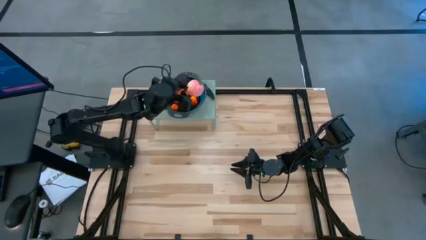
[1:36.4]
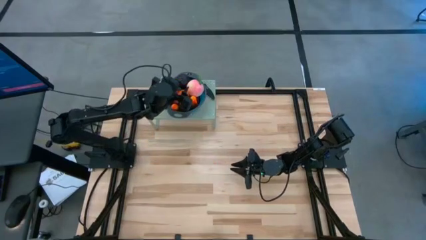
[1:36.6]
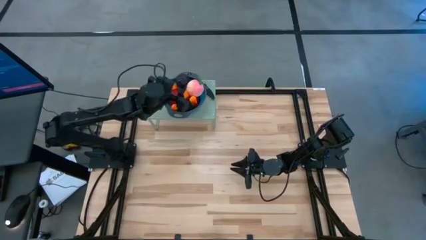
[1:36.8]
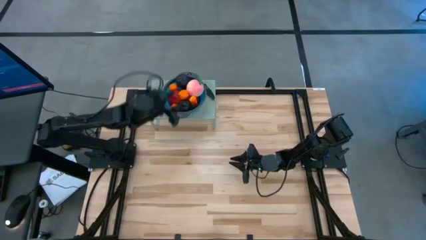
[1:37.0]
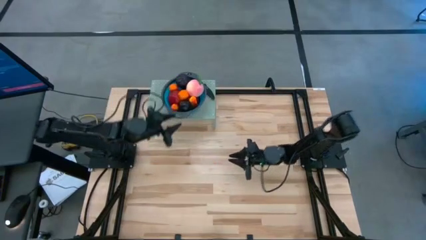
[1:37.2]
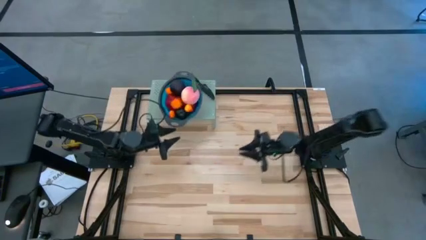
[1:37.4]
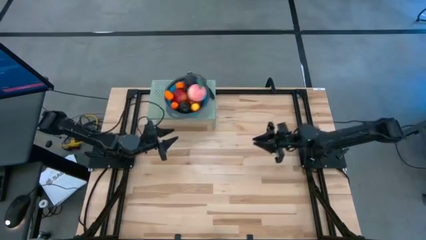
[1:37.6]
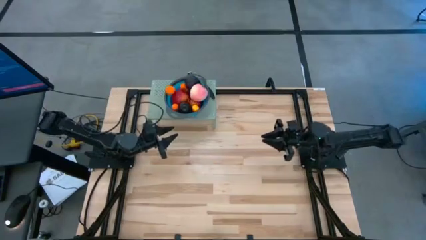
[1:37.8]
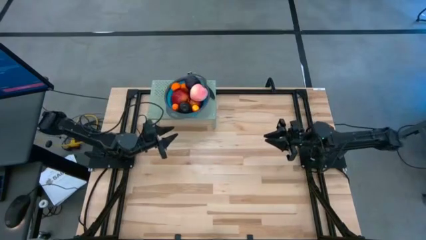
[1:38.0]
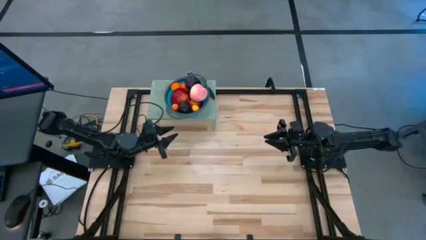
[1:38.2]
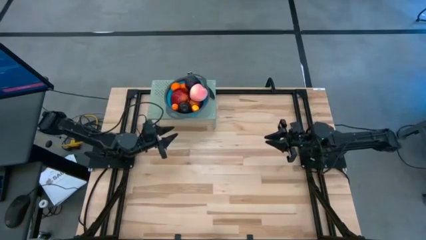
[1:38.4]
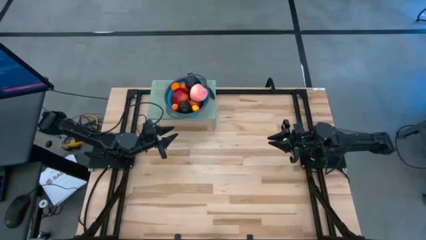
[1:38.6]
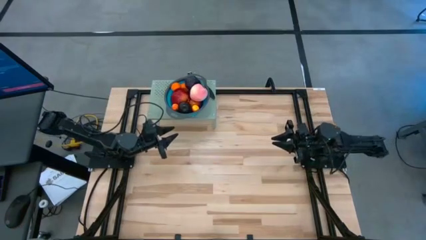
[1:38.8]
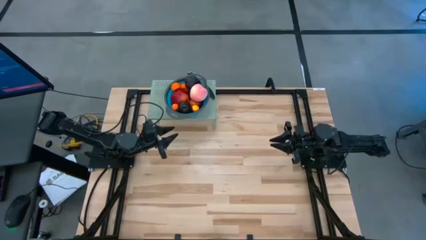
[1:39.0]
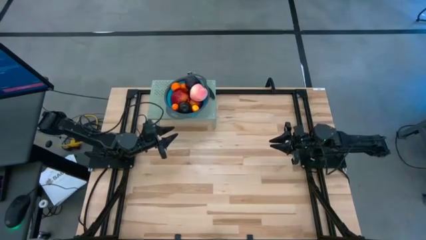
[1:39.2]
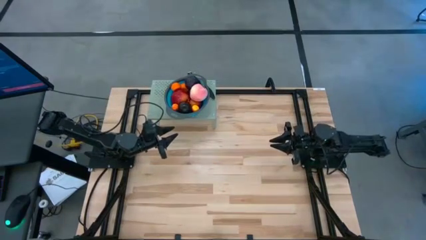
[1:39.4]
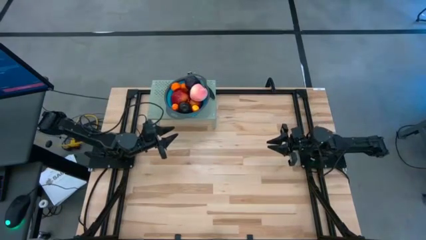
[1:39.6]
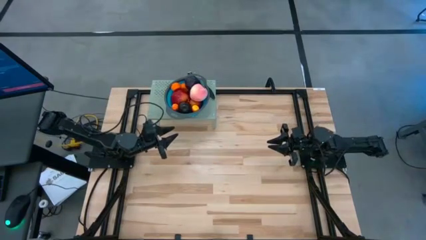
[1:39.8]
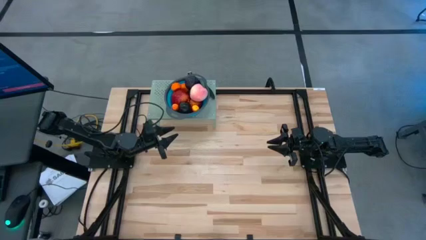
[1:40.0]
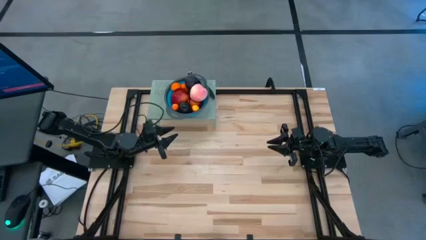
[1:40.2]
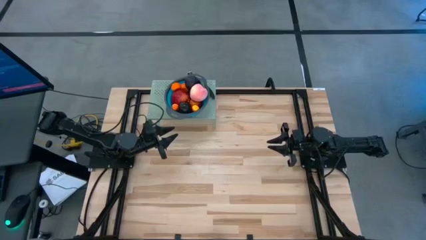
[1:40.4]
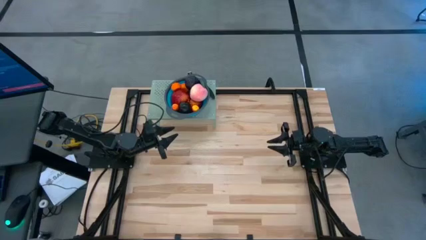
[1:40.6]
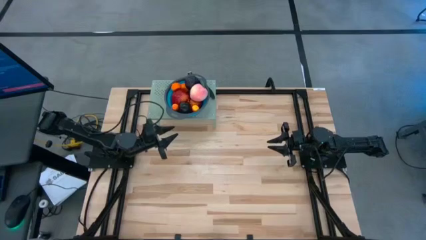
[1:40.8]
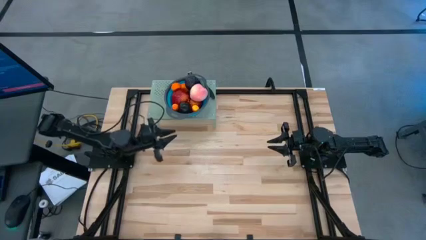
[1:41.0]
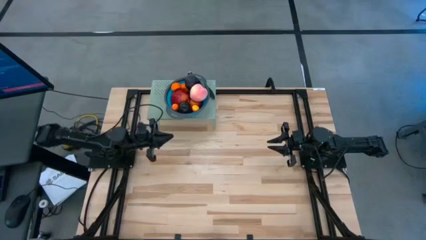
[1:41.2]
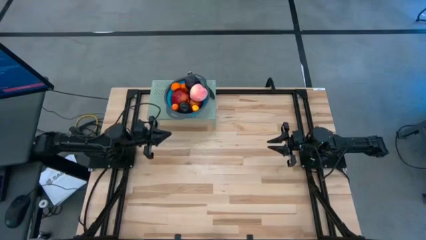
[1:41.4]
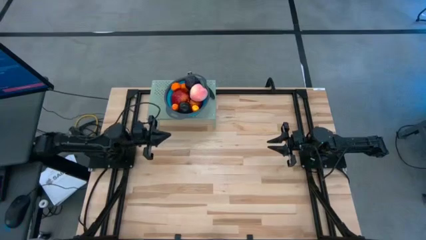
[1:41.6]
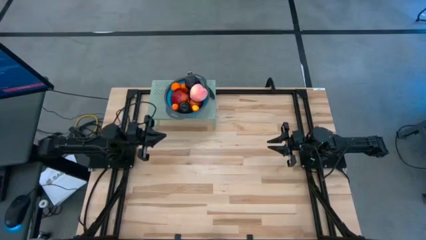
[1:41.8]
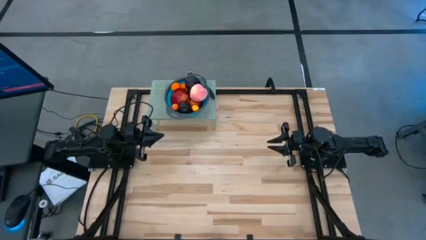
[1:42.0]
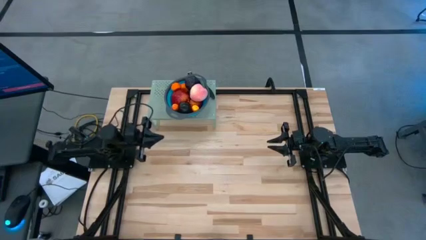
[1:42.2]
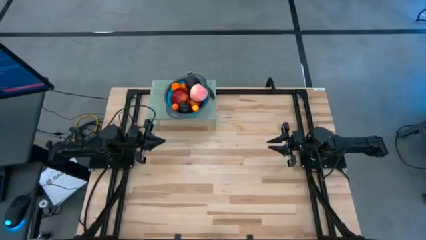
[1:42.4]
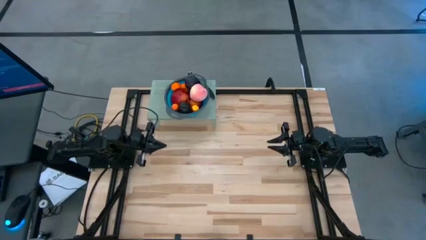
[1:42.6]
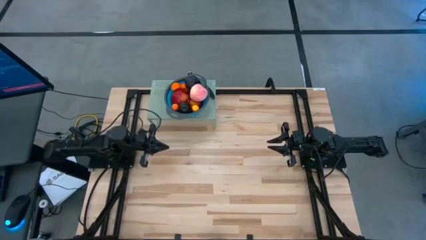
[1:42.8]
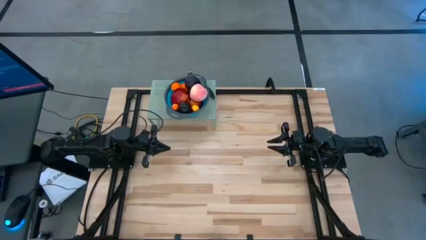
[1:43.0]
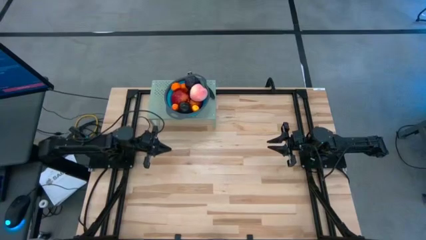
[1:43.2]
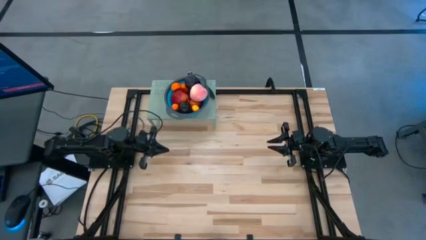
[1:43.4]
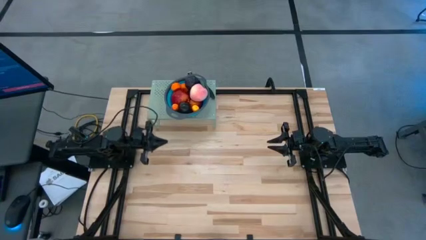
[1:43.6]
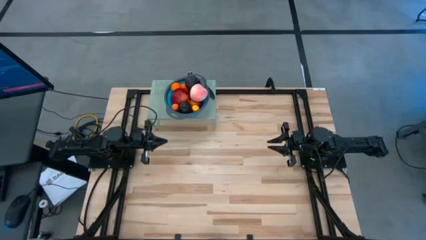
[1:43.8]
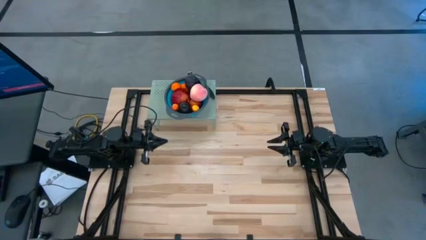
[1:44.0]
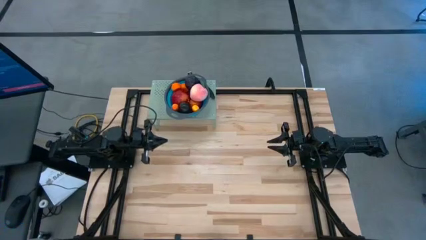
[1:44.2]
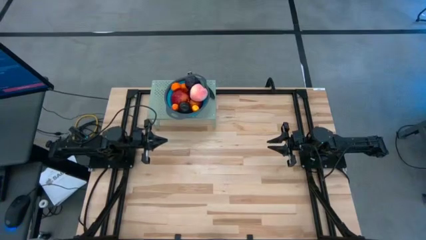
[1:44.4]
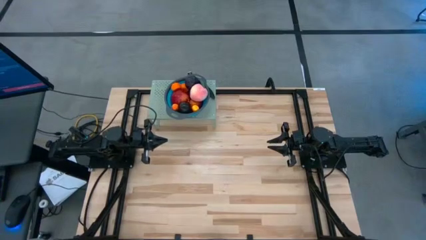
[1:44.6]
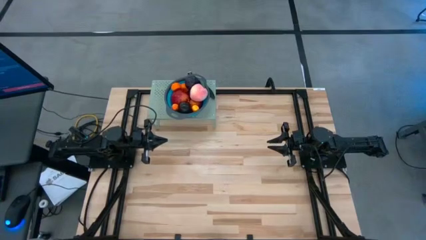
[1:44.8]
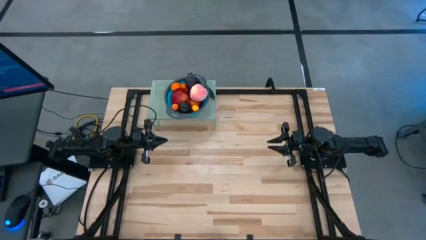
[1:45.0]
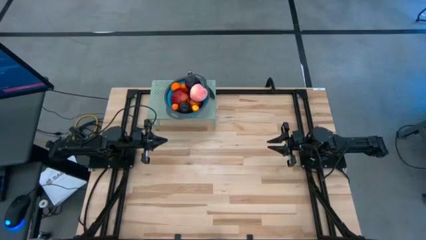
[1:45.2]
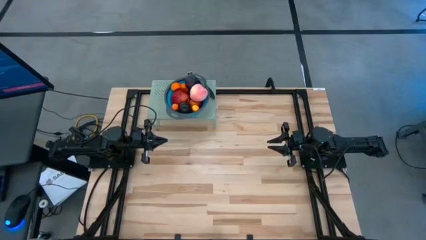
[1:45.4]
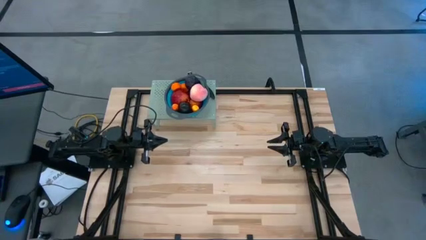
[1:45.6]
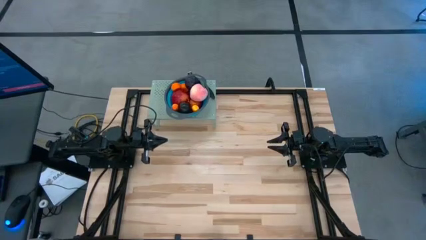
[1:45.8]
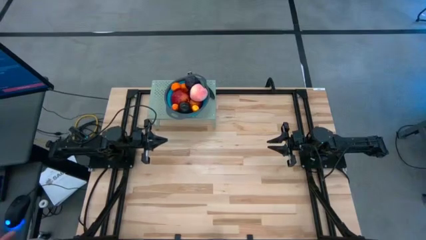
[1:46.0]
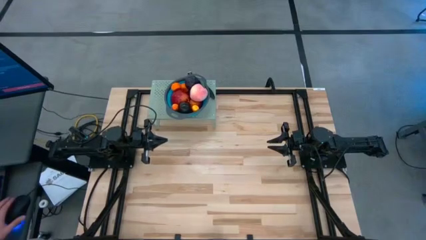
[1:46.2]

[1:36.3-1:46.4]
Task: Pick & Place Fruit
Return to Home Position

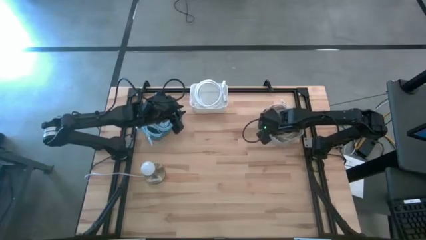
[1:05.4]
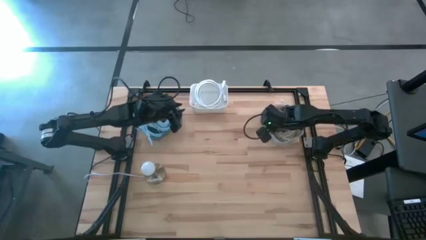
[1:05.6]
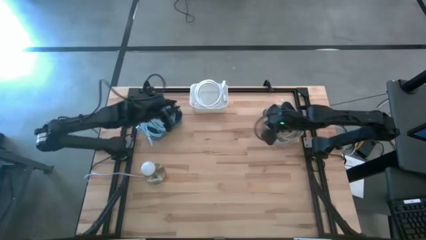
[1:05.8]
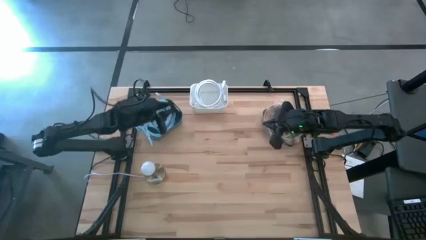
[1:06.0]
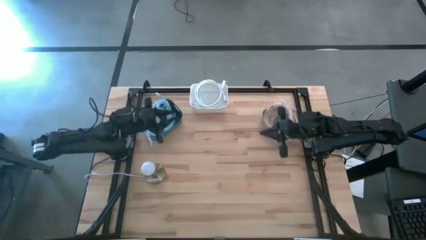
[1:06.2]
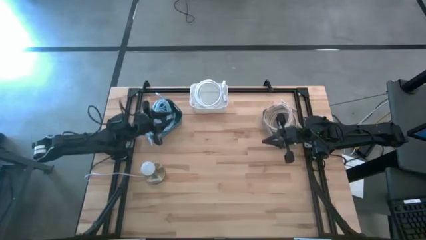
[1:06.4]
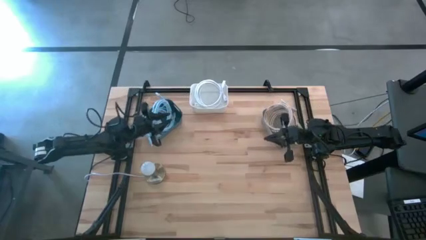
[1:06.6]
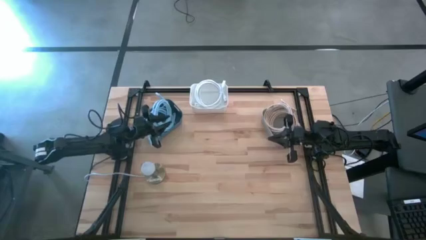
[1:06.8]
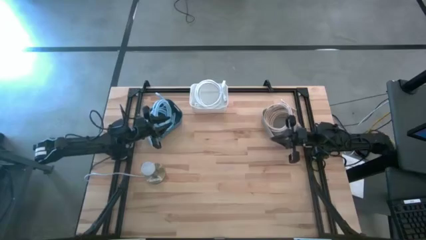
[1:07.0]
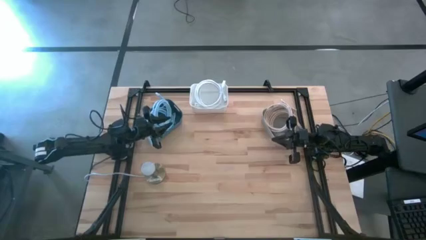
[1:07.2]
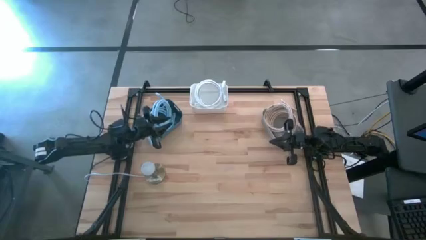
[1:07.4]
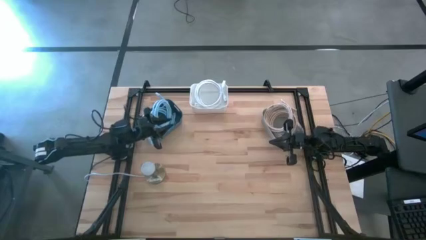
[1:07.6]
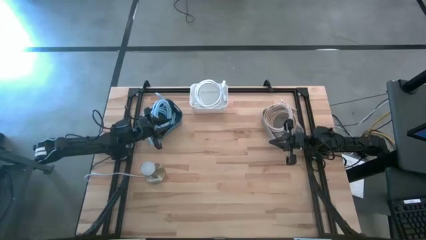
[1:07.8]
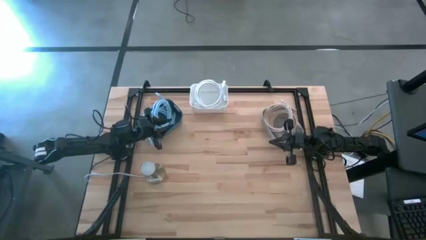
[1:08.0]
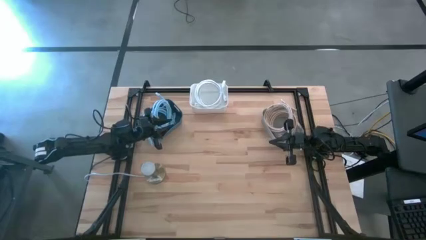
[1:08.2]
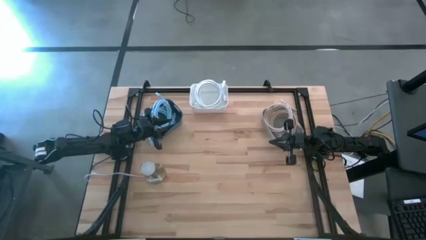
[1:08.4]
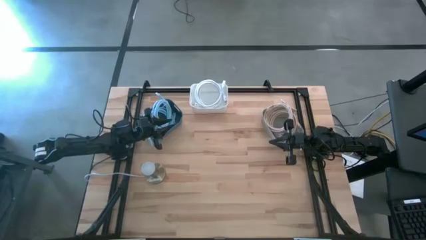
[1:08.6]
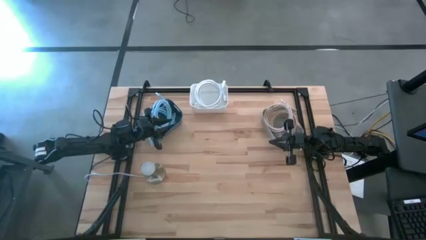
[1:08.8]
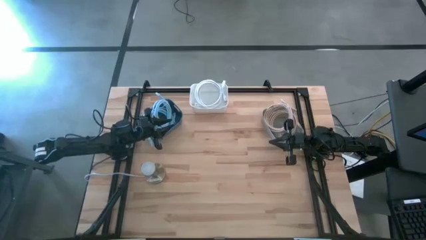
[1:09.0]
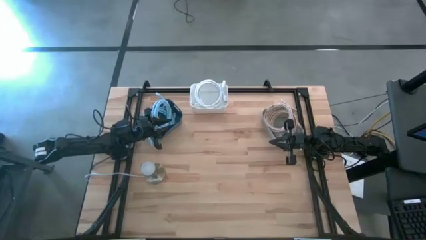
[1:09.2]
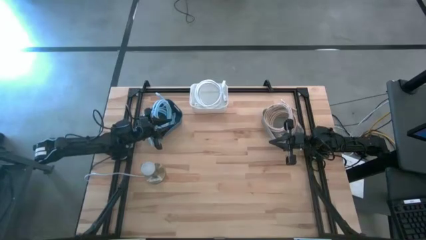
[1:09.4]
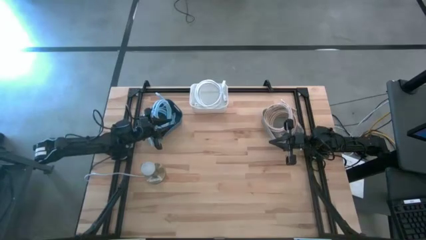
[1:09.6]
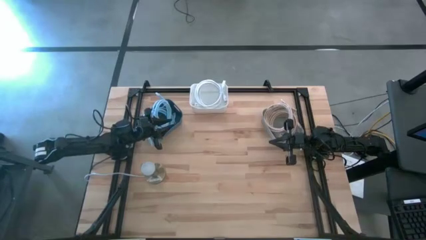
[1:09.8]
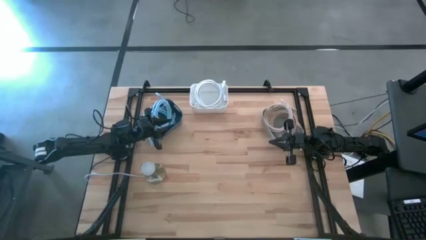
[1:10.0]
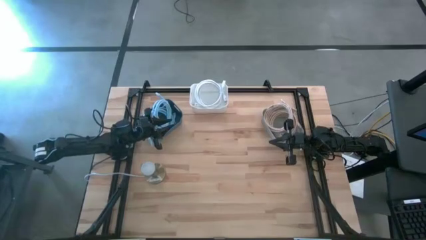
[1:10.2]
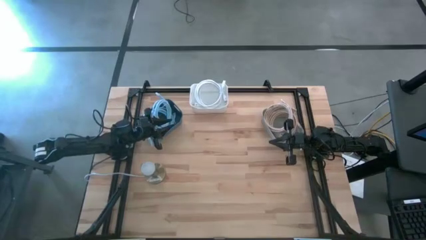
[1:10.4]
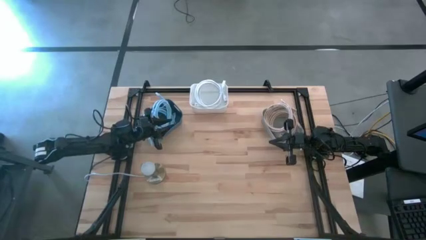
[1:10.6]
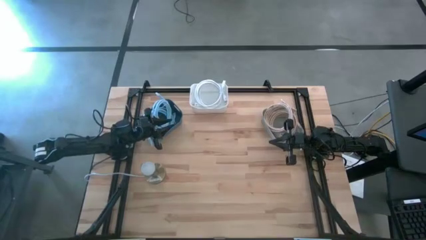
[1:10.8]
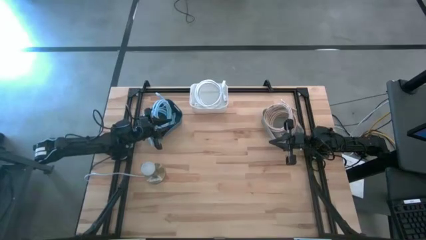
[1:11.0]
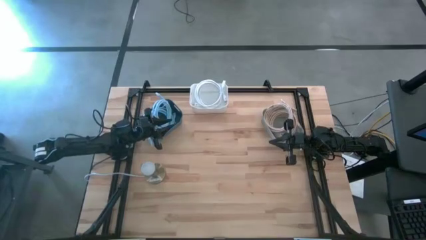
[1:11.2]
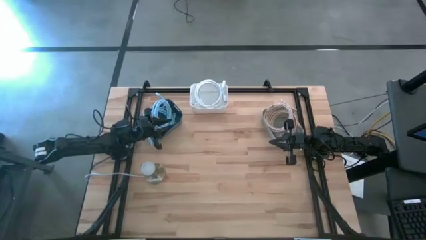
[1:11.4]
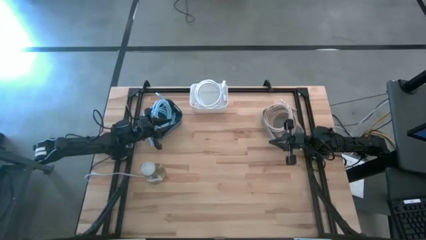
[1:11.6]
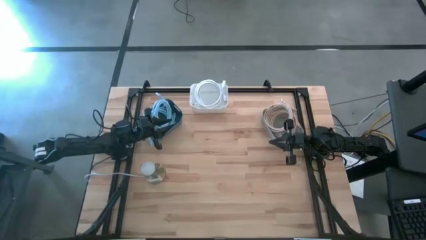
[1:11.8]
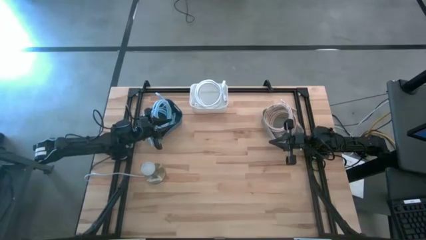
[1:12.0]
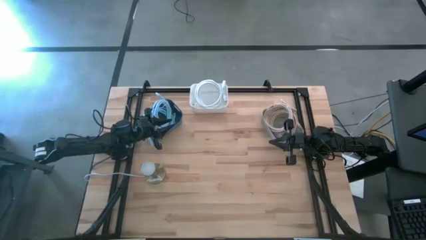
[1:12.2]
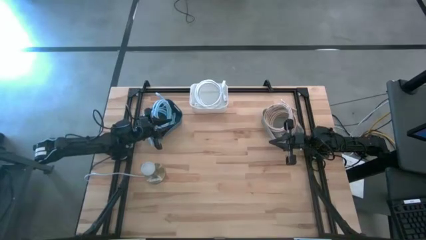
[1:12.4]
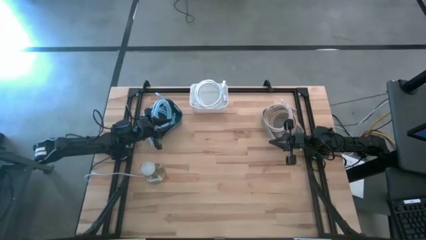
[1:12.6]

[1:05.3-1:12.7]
Task: Sort HDMI cables
Return to Home Position
